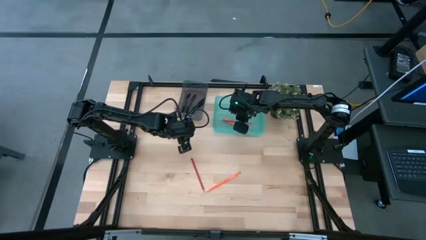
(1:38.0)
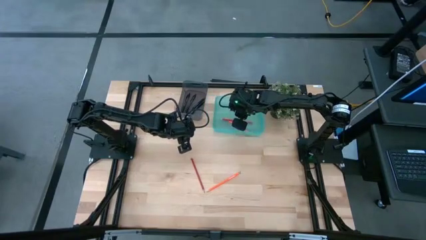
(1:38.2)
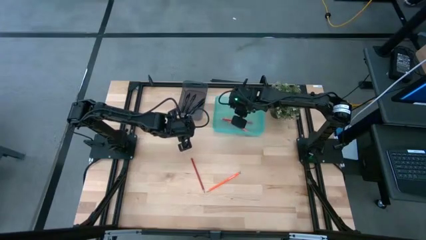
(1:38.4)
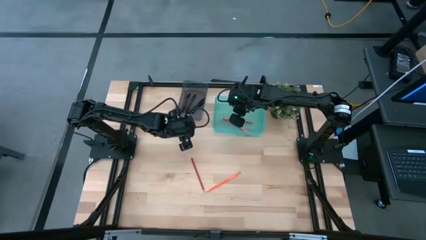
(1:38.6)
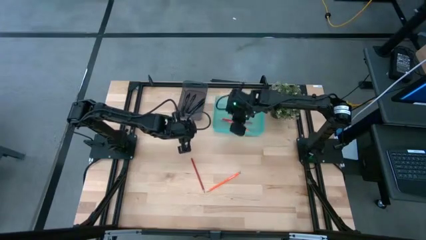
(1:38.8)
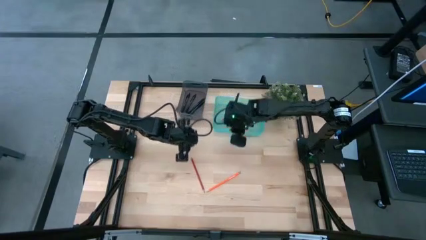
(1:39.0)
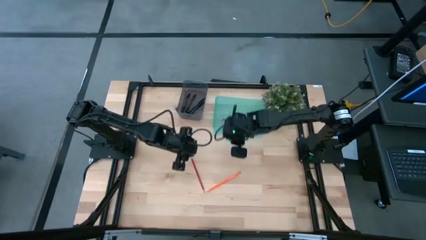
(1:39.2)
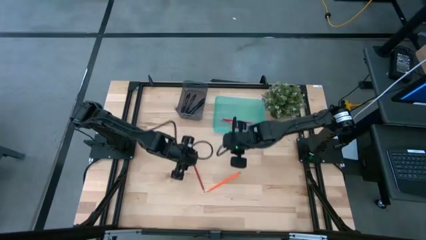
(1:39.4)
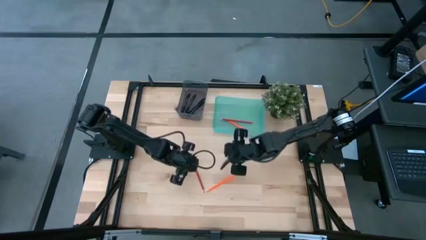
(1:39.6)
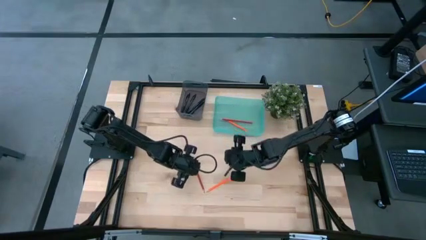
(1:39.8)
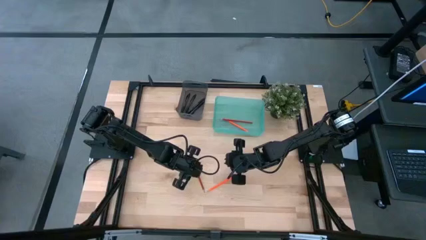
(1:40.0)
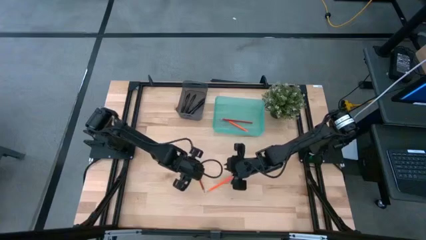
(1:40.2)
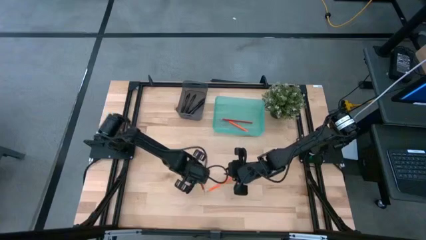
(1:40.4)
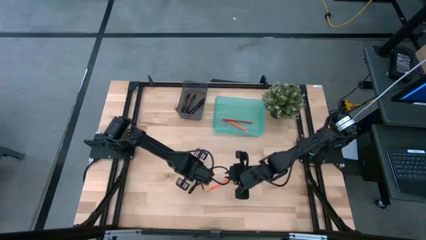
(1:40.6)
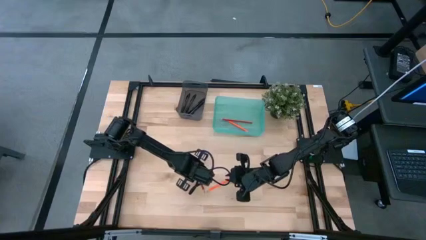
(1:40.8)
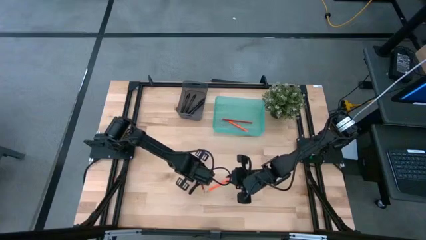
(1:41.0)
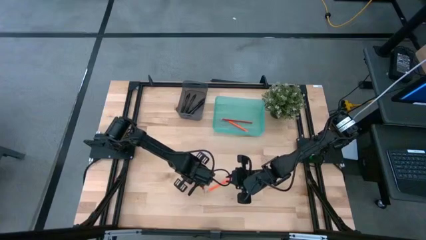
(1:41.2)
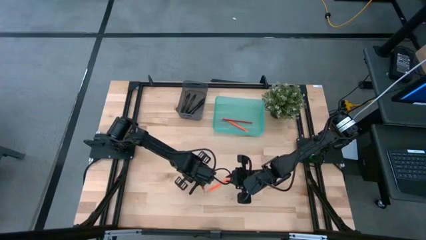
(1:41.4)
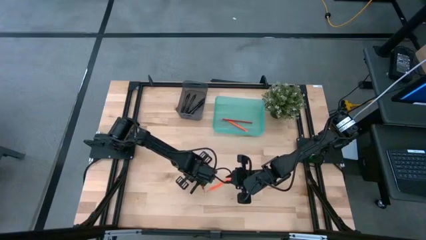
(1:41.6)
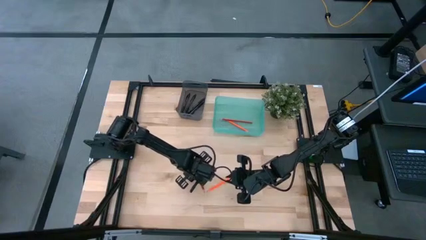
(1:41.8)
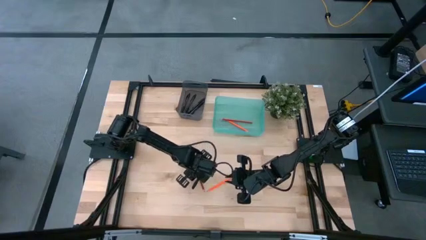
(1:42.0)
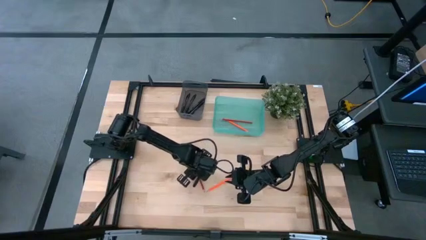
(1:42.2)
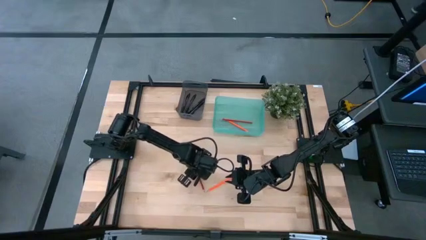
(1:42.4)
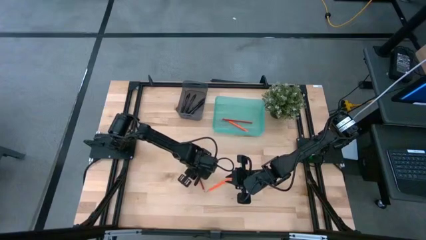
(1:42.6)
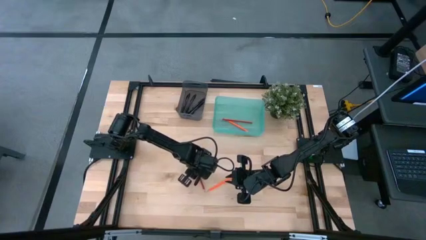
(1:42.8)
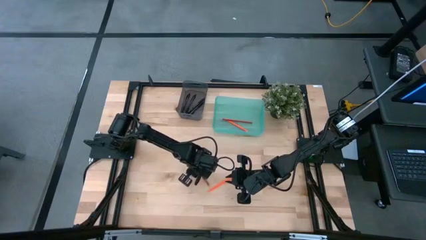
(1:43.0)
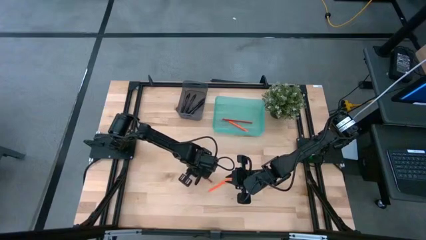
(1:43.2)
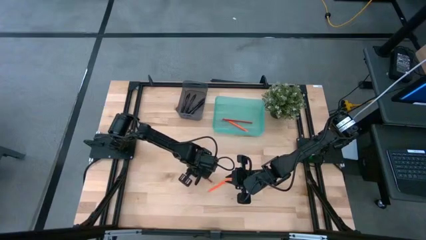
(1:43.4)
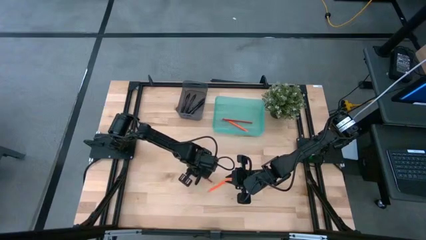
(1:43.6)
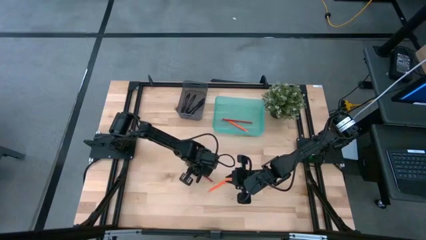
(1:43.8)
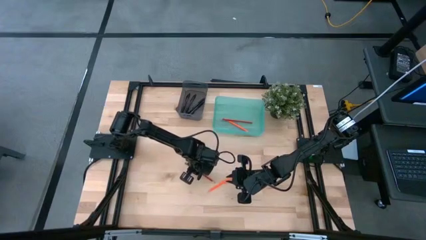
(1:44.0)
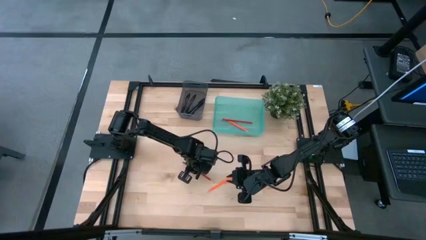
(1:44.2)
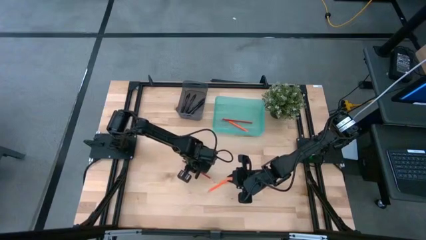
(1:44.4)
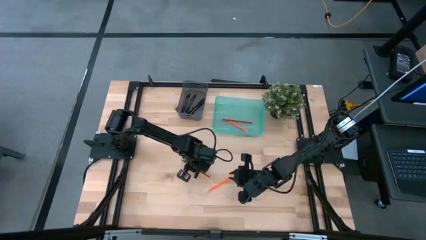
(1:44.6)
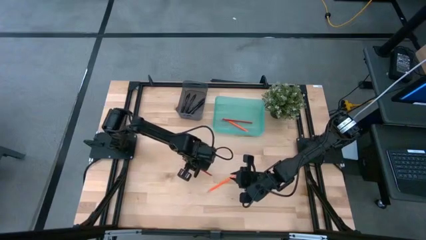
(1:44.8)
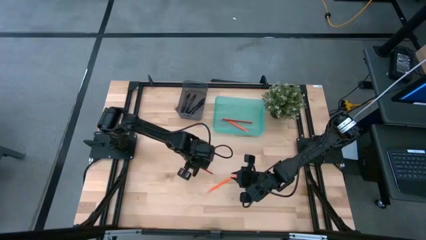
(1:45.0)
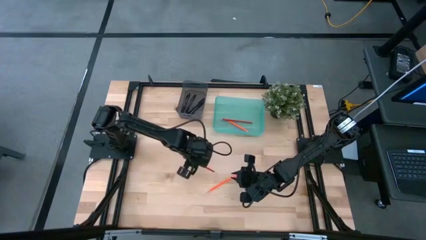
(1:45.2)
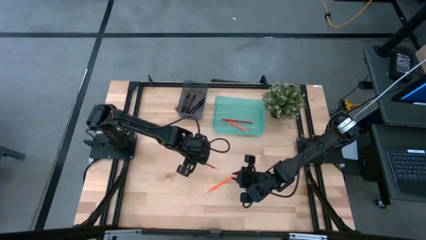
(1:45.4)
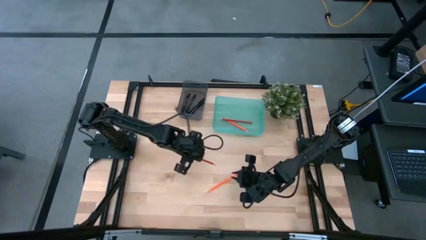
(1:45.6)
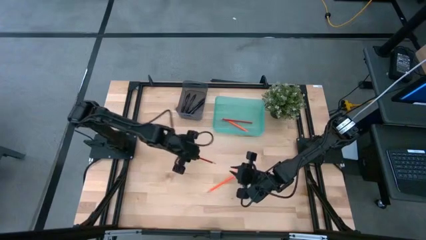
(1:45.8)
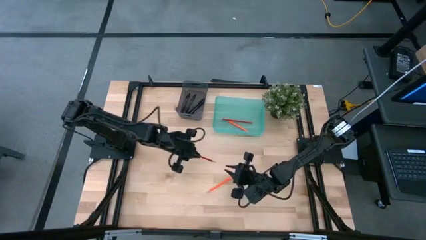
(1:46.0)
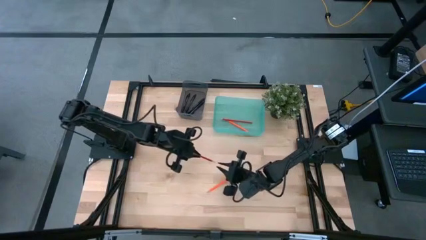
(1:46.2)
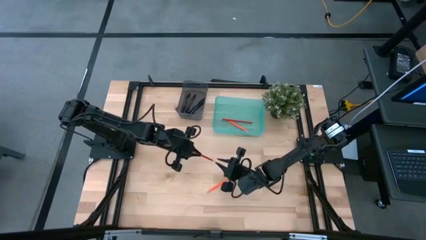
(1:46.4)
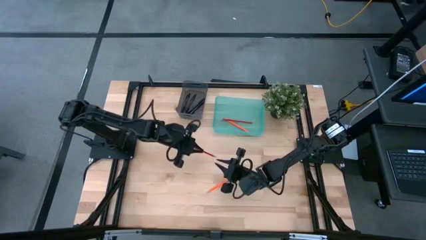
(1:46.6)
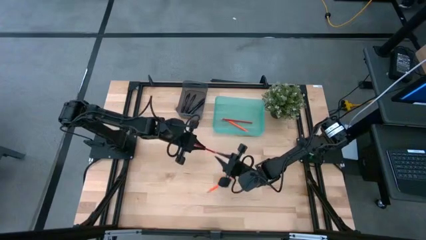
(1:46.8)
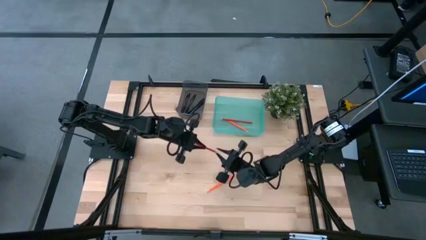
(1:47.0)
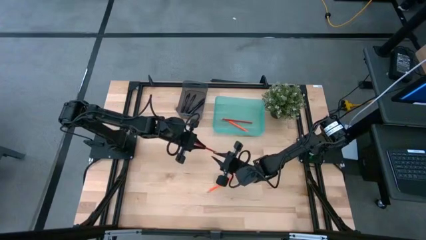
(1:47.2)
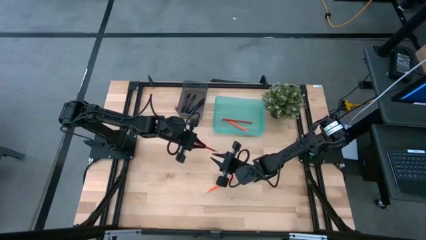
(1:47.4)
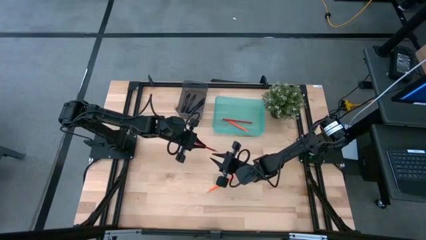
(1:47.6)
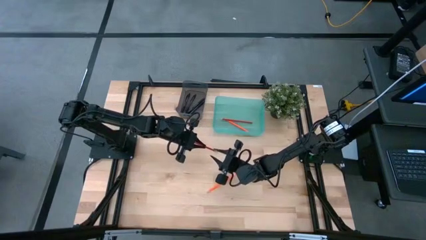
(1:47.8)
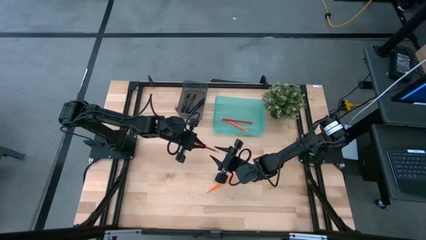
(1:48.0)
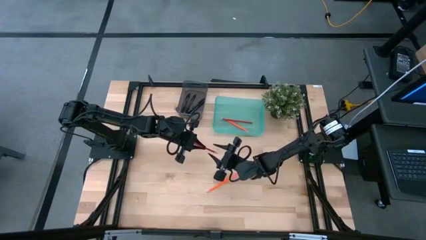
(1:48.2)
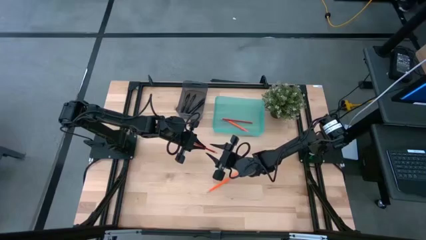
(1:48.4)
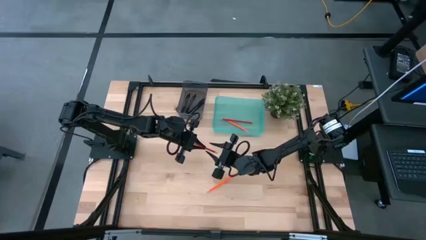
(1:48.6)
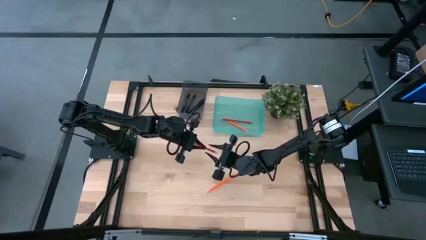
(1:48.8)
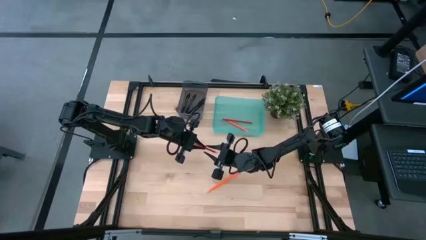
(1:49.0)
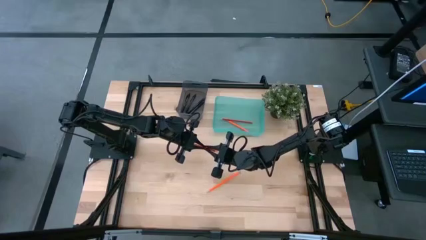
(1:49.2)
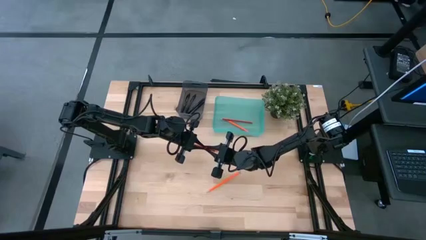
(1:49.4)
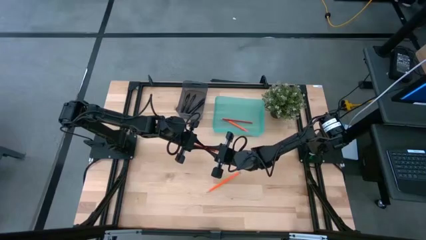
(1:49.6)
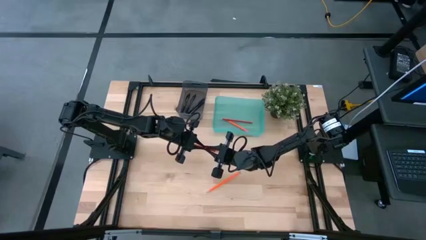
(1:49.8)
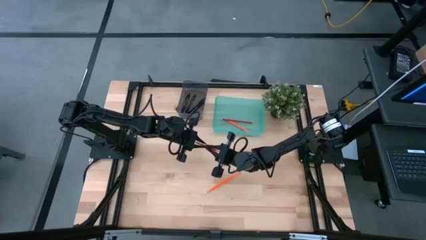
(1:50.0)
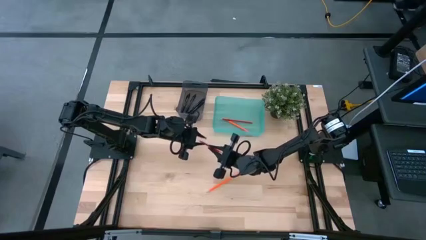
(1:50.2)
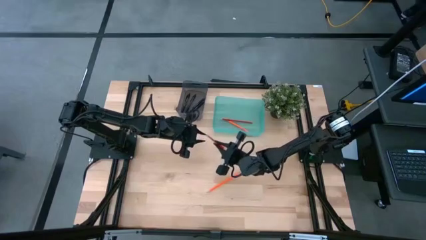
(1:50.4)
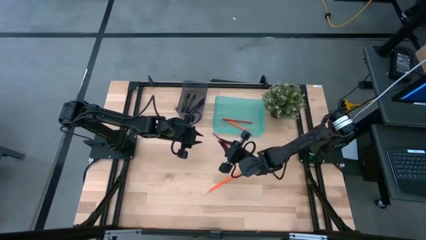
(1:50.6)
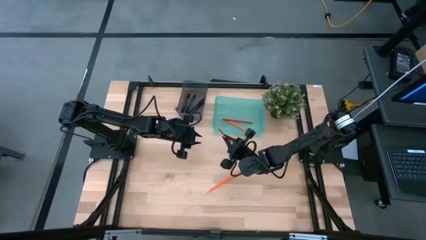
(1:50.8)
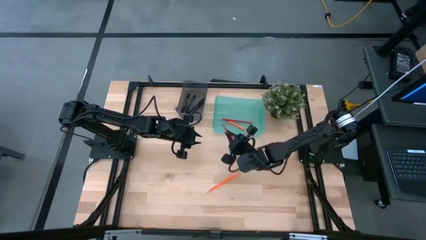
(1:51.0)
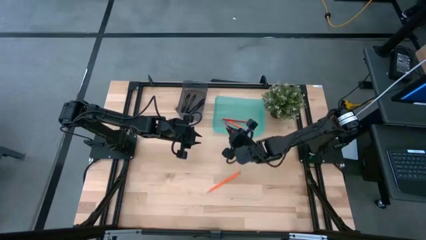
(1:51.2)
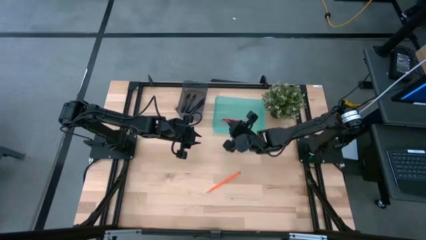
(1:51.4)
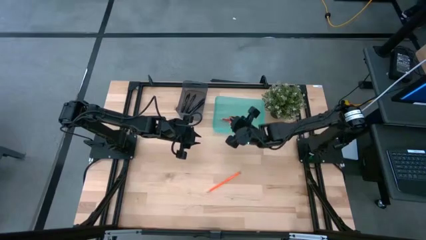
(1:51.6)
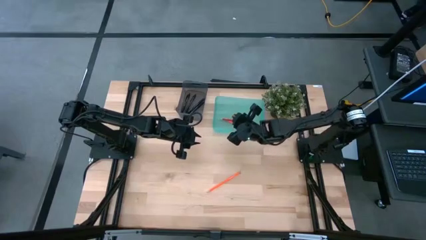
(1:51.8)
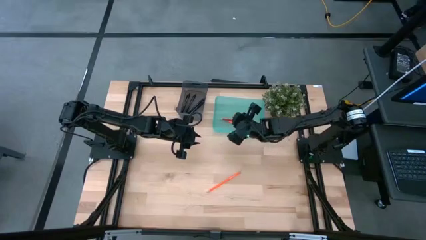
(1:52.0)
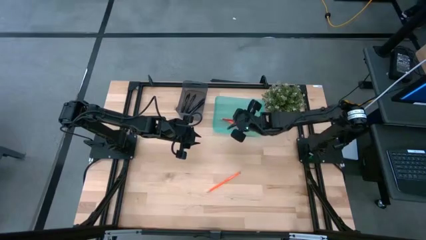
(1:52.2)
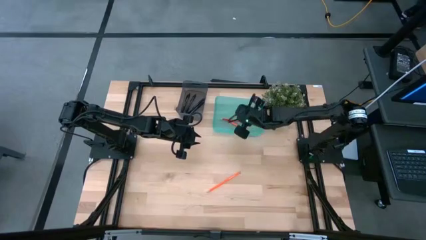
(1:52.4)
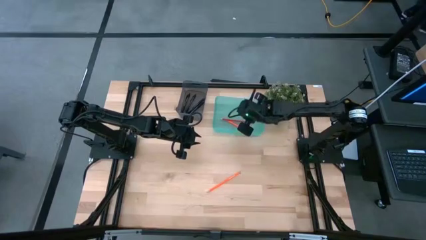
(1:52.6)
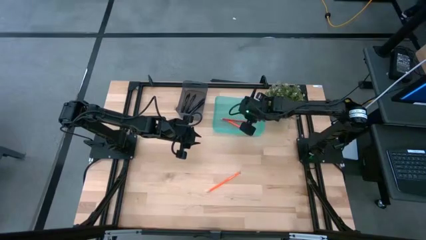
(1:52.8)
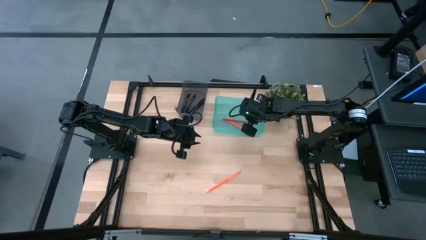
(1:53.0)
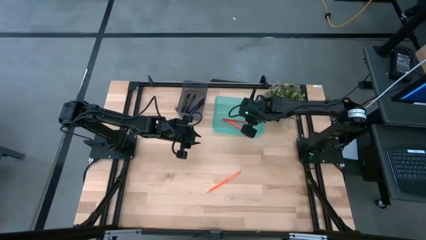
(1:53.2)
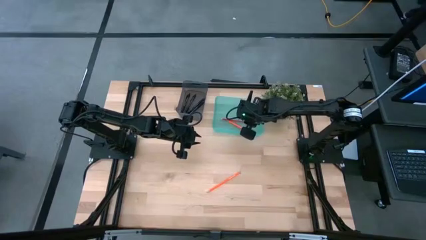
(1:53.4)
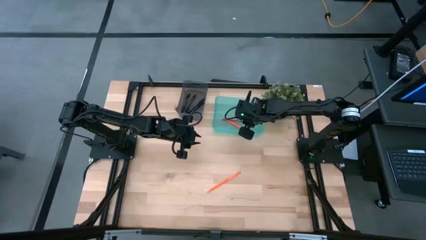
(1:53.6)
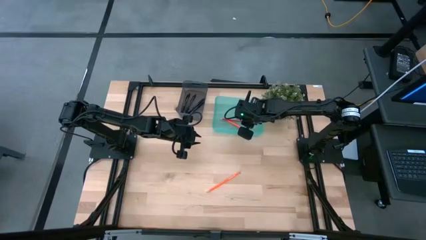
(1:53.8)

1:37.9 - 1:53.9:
Task: Sort pens & pencils
Put the red pencil into the green bin
